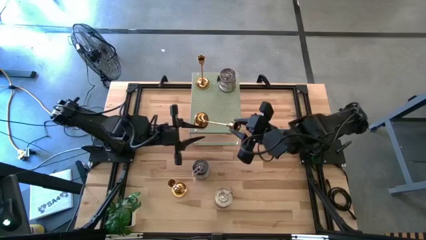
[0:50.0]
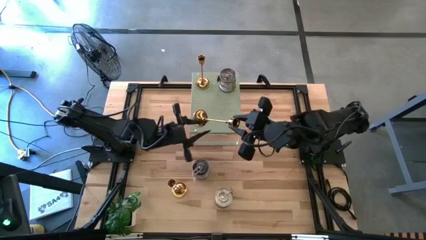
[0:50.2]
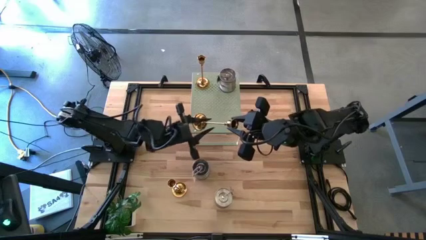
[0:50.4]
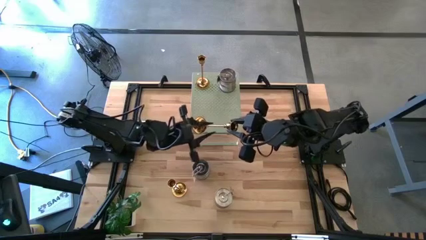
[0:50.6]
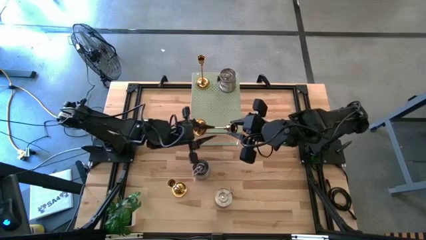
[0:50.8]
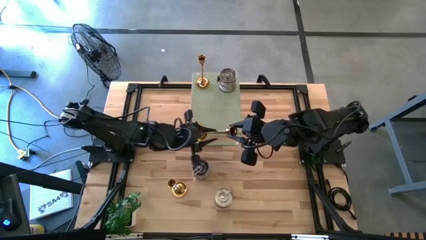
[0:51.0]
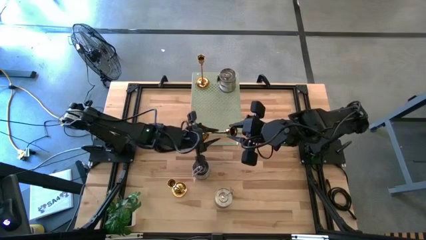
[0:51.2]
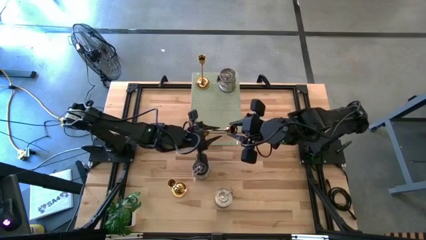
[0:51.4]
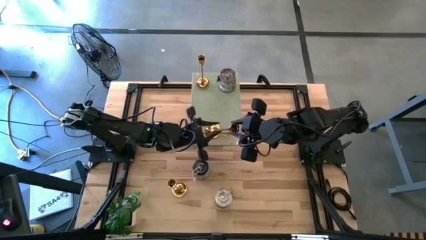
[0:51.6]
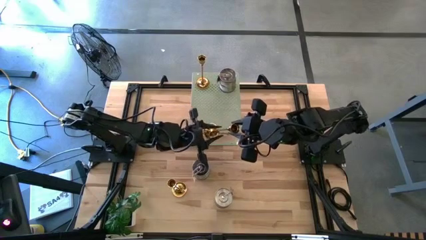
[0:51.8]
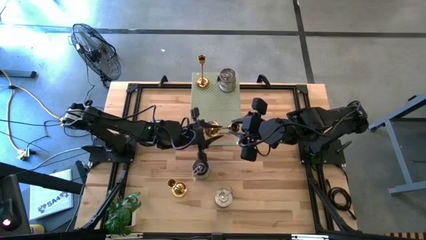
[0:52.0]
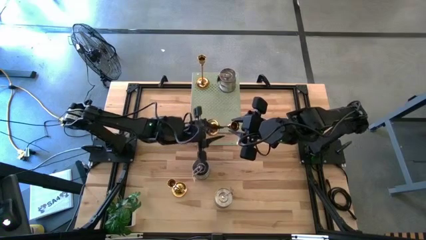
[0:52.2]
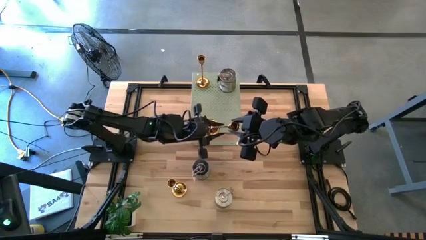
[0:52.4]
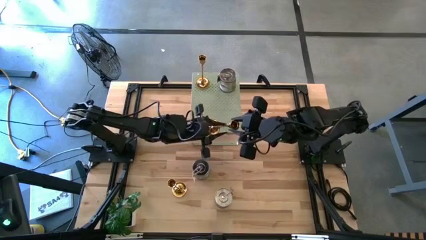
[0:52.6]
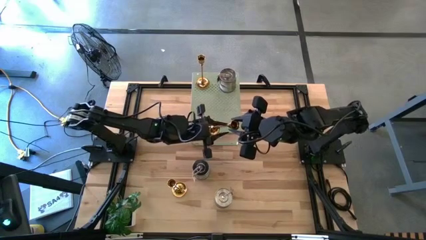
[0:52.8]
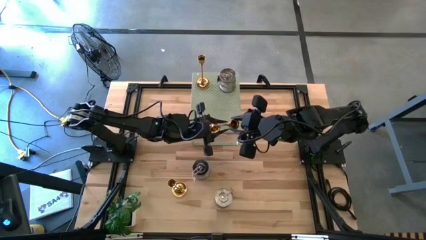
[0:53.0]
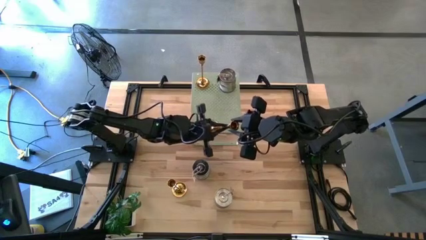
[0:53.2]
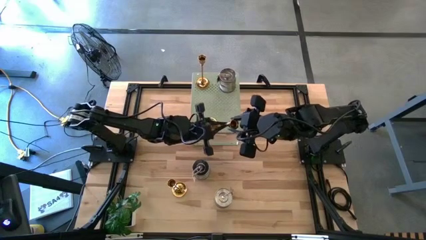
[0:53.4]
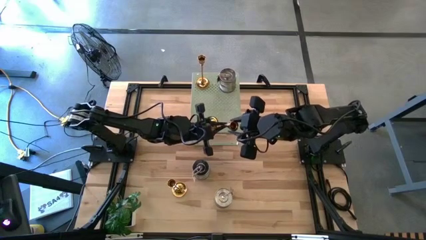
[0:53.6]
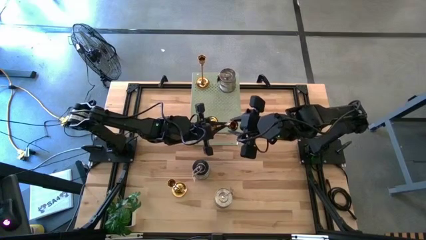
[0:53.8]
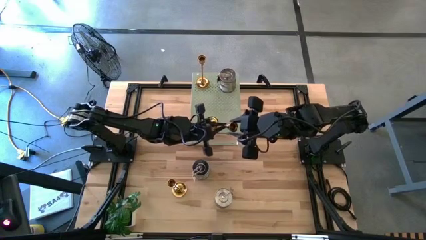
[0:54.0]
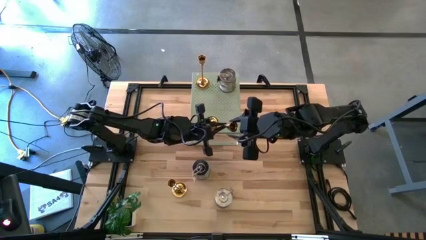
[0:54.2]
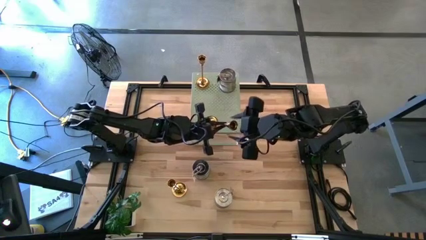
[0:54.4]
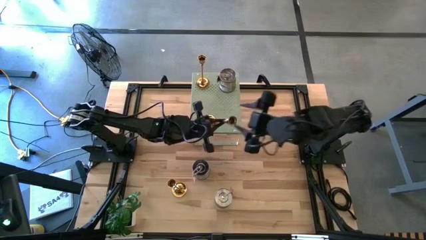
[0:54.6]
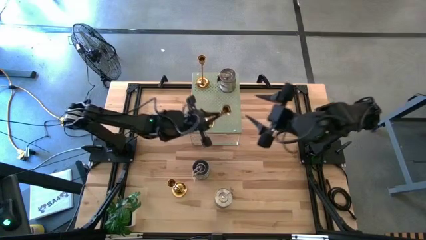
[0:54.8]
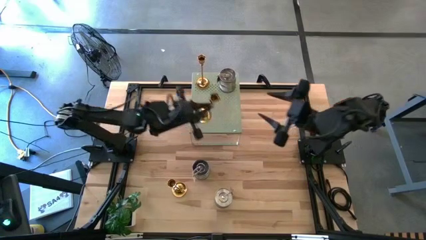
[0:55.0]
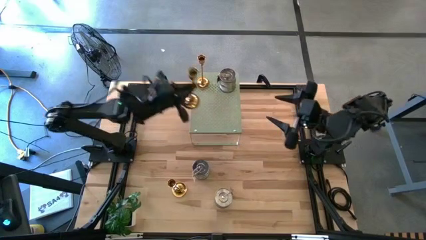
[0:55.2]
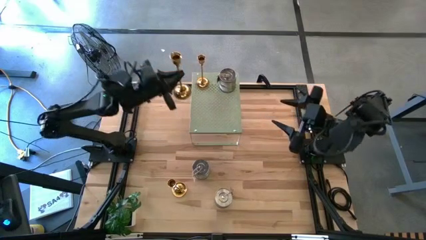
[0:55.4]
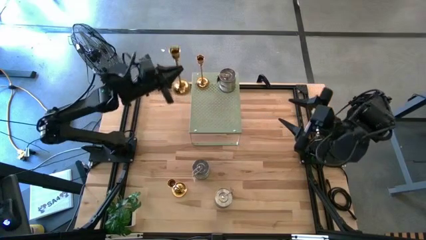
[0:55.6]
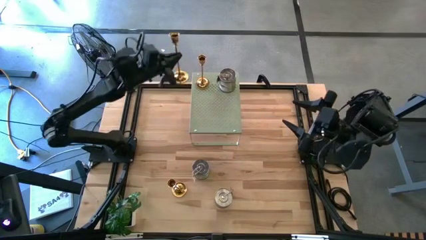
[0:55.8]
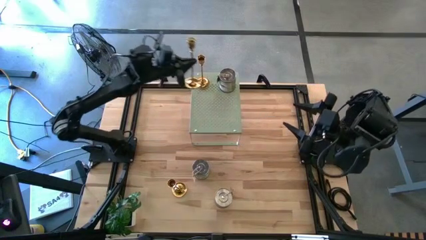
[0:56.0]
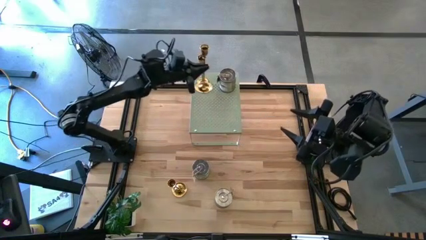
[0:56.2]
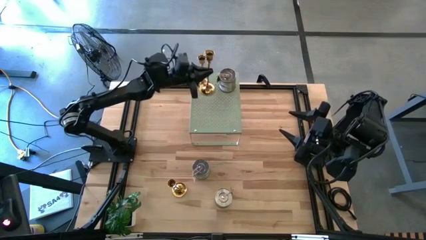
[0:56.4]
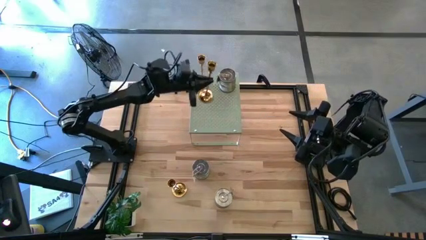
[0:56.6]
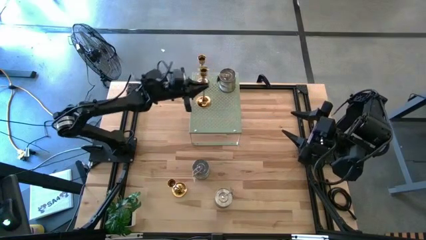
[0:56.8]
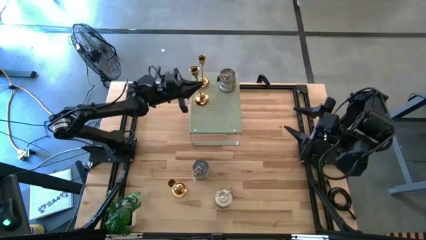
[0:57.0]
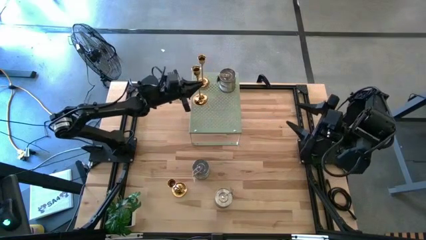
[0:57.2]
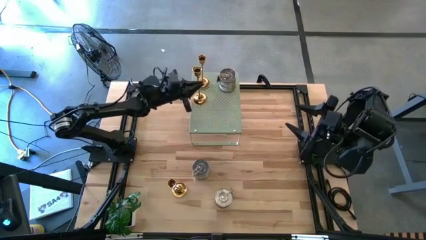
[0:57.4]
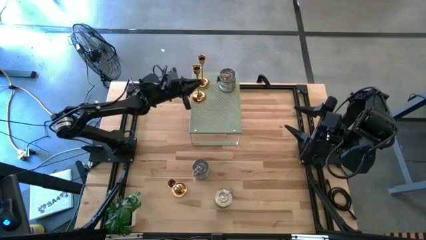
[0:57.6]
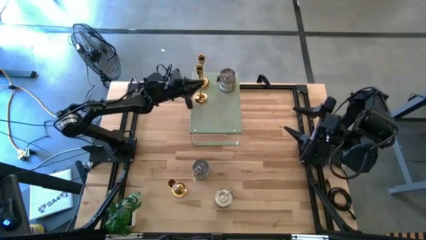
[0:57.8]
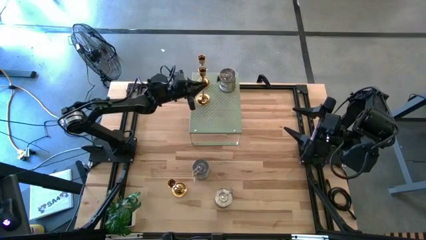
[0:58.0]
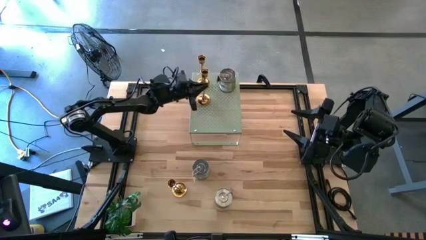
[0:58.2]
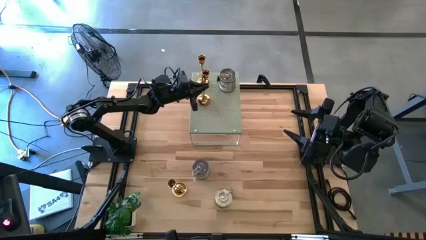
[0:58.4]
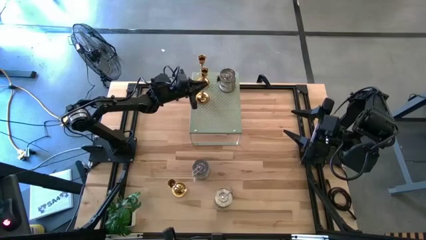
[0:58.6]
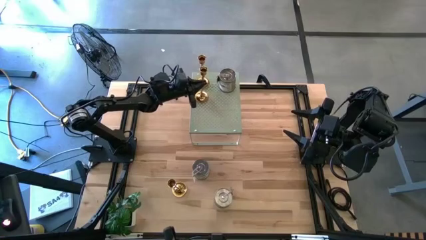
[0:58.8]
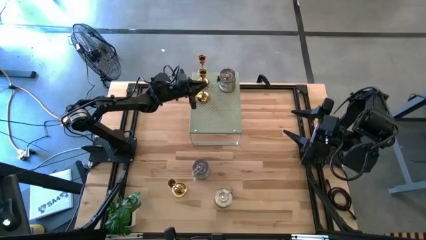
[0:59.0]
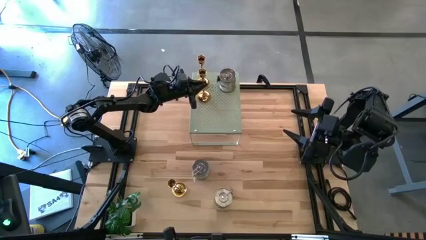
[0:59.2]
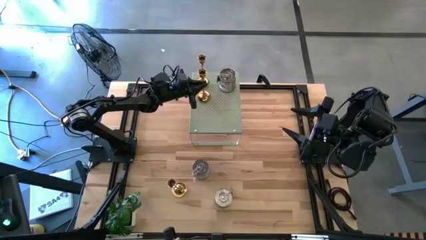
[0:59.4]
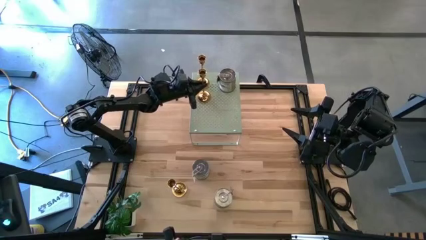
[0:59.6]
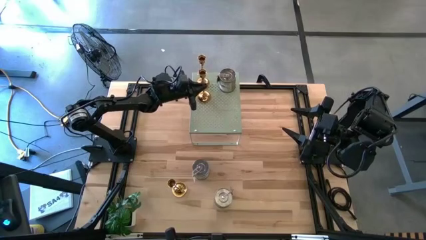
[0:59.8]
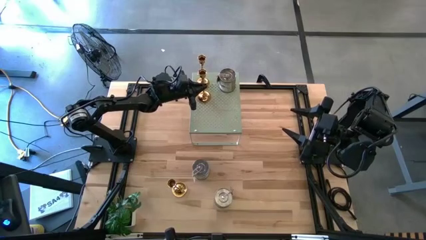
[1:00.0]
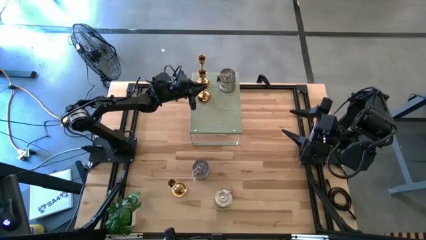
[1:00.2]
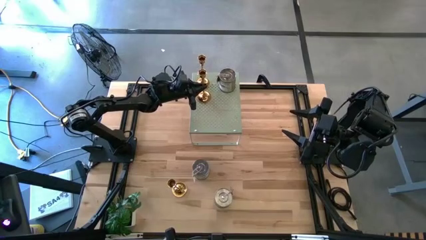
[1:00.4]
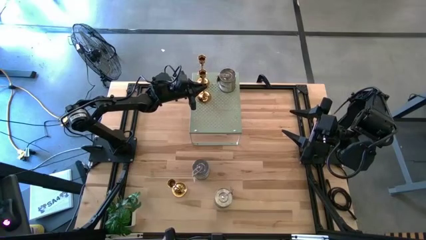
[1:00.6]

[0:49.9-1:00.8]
Task: Pick & Place candle stick holders
Put the right gold candle holder on the shelf aligned with the other gold candle holder

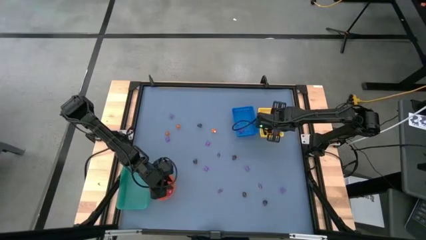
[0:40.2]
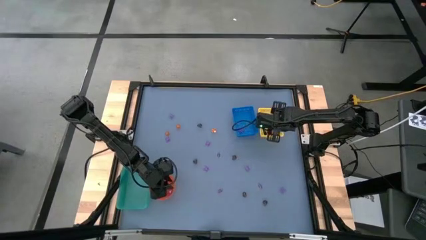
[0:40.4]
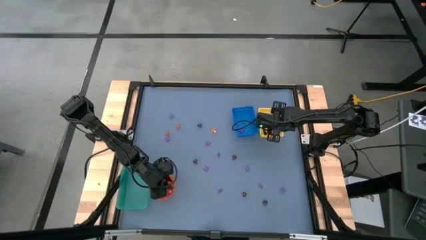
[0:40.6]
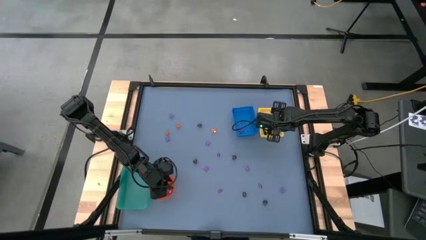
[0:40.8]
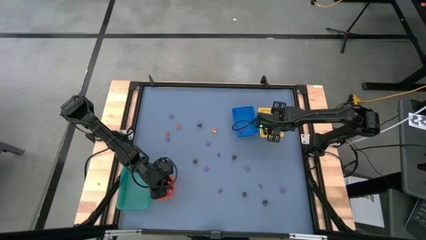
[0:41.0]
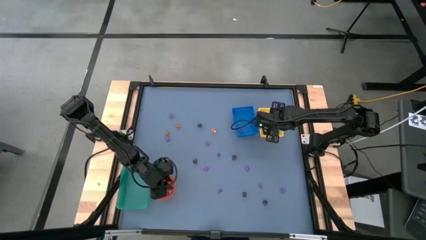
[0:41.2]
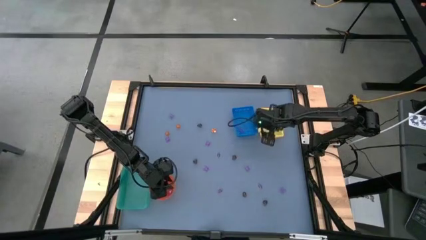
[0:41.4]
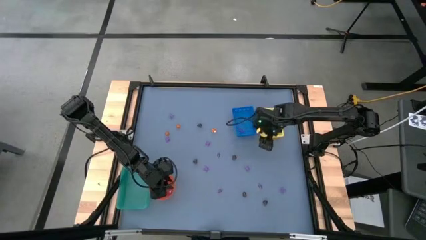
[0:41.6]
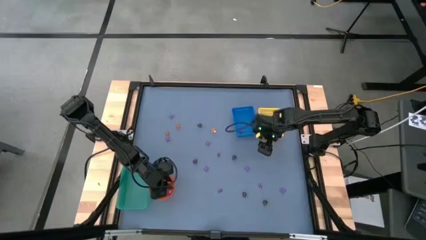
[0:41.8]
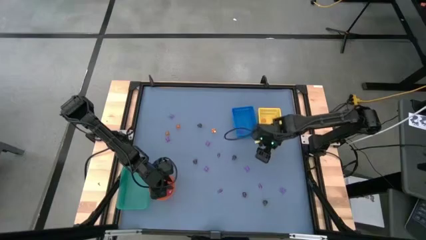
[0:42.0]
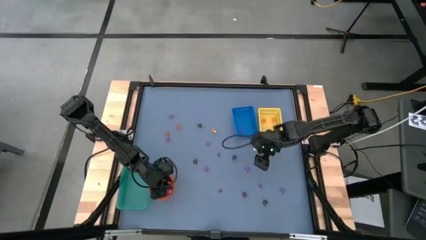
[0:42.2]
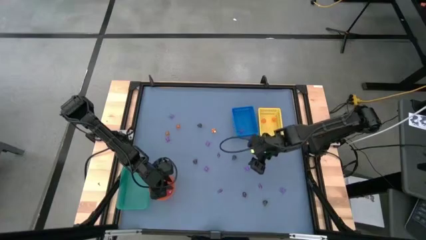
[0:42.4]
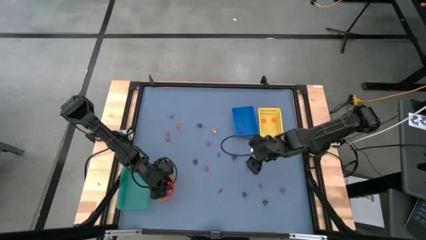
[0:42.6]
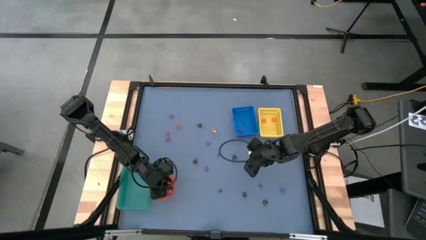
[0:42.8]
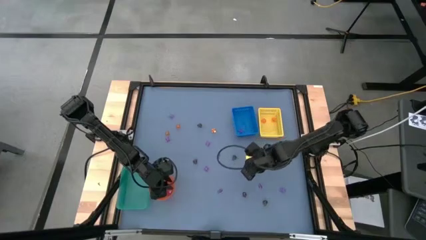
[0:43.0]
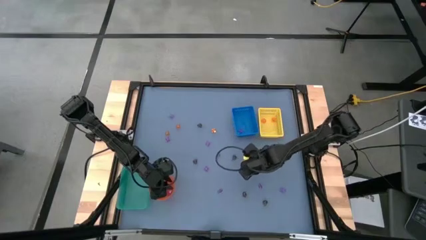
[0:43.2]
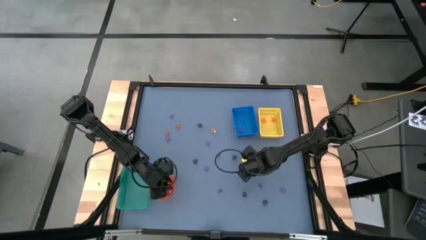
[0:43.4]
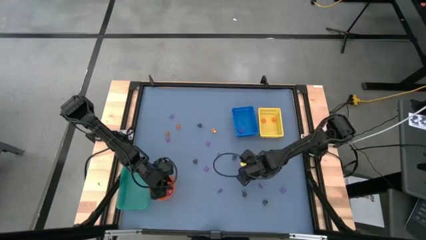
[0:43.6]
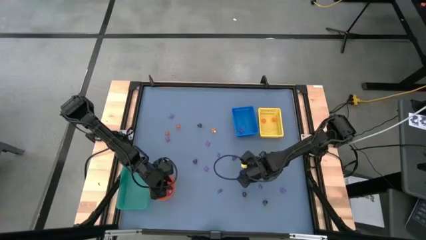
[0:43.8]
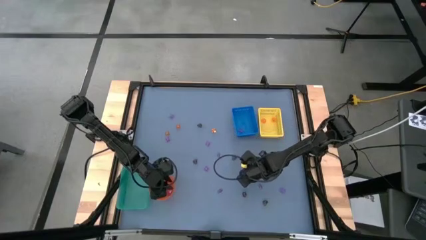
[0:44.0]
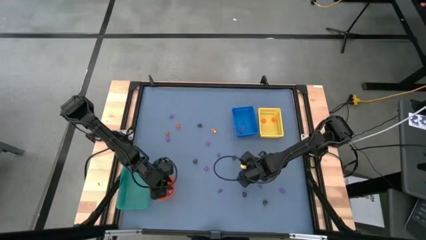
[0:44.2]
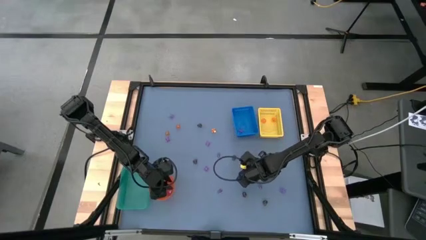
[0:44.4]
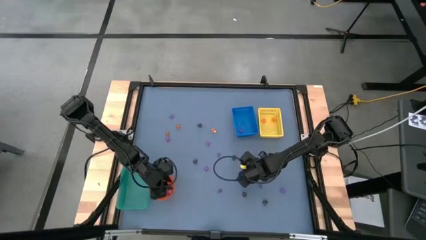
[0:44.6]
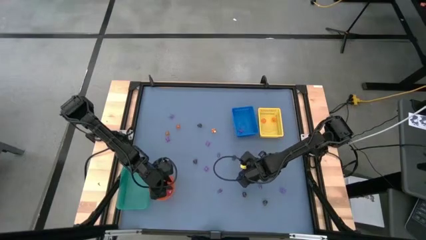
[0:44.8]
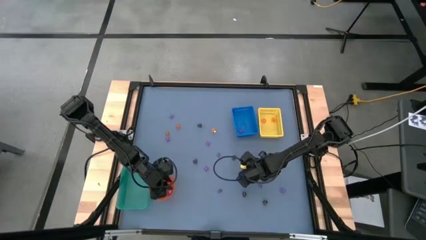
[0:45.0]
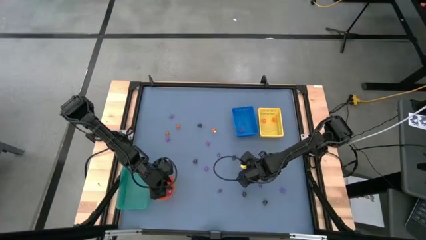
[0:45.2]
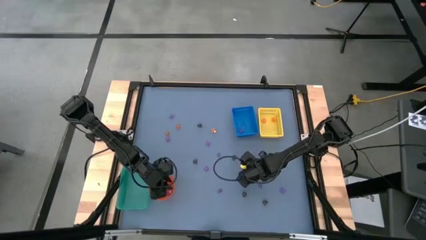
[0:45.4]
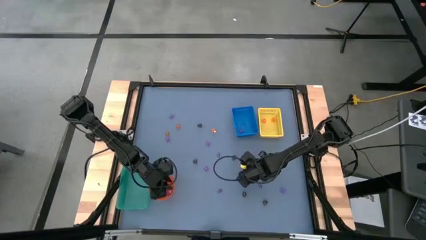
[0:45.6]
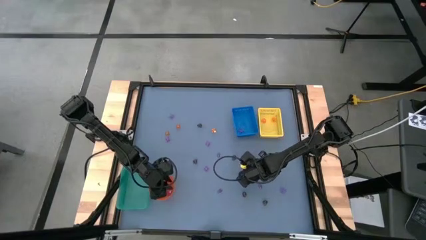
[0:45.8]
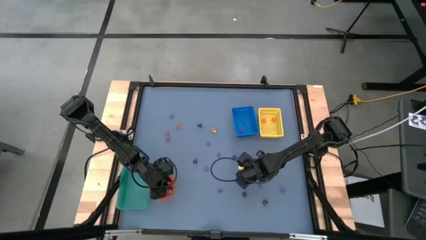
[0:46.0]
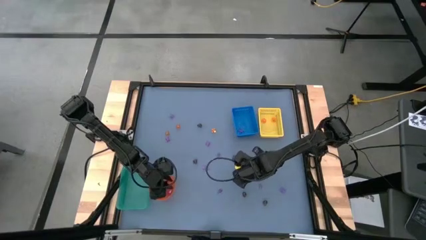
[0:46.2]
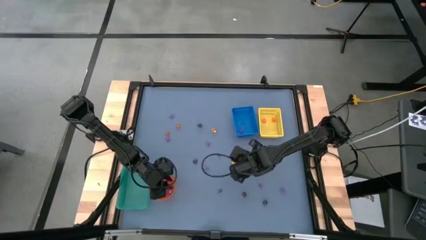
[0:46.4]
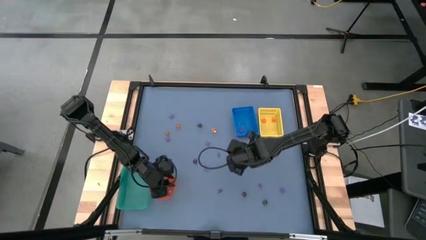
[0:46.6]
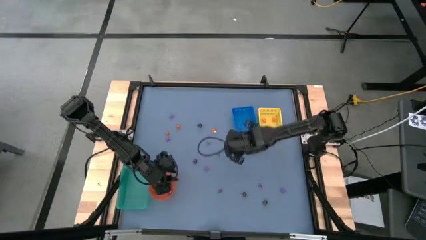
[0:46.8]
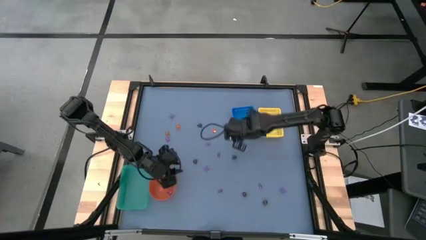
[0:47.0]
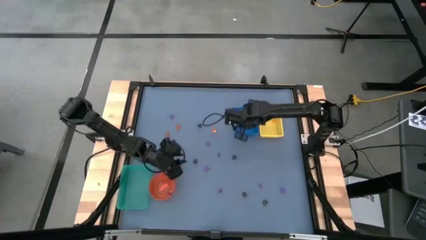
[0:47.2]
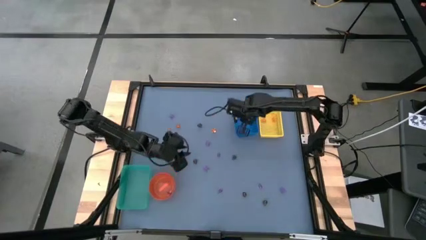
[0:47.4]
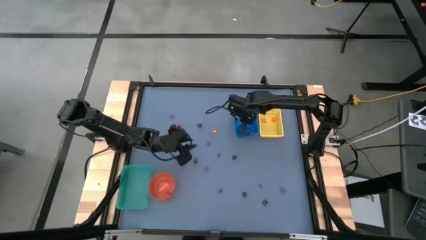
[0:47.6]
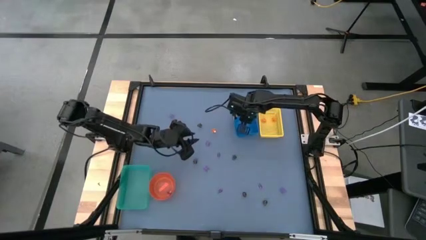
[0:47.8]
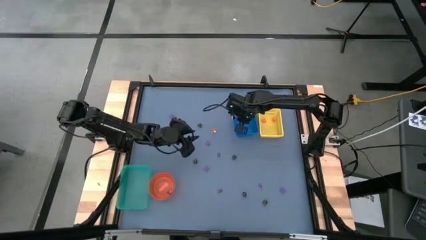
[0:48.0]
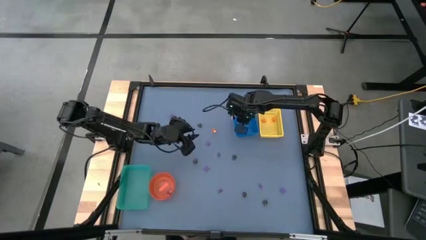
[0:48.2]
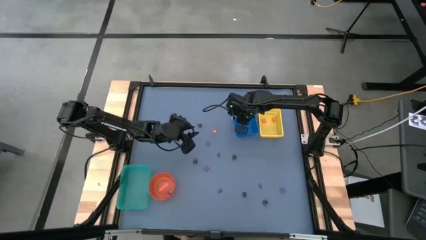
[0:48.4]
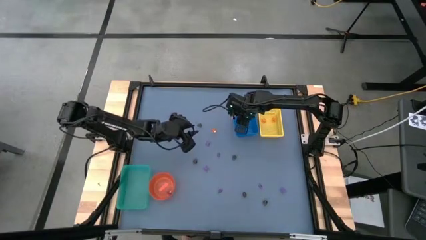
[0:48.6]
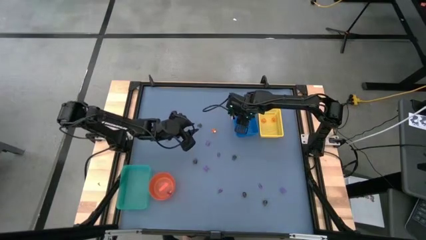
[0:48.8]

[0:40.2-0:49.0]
Task: Sort Halloween decoration
Put the violet spider toy into the blue box
